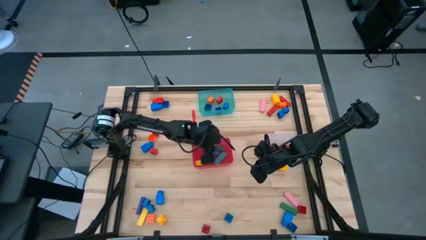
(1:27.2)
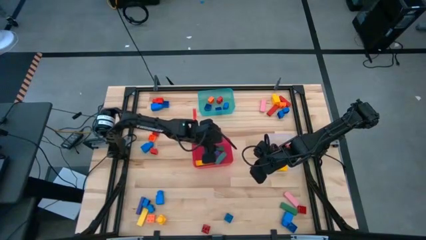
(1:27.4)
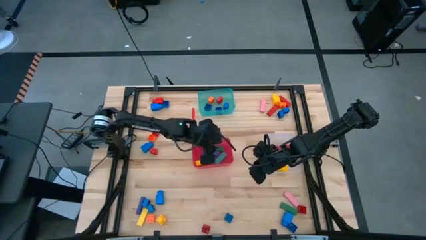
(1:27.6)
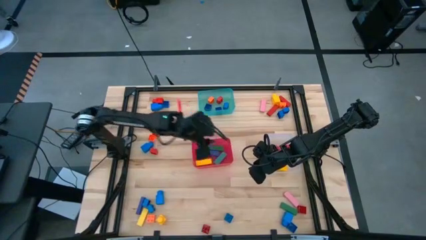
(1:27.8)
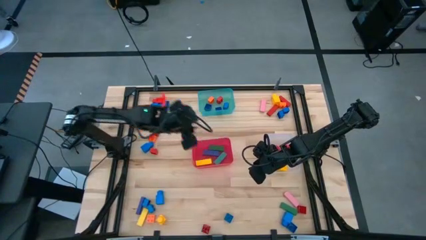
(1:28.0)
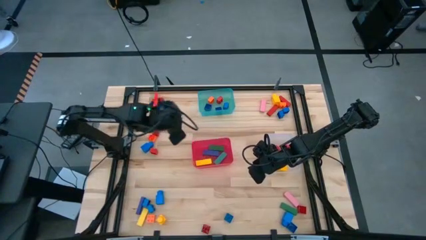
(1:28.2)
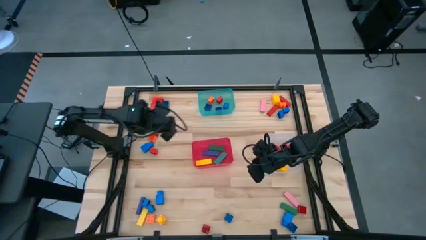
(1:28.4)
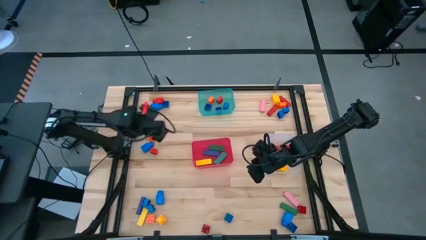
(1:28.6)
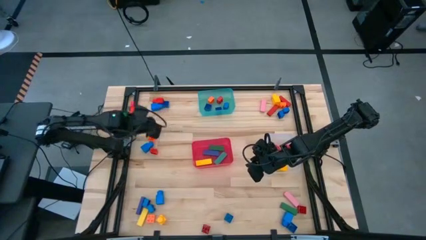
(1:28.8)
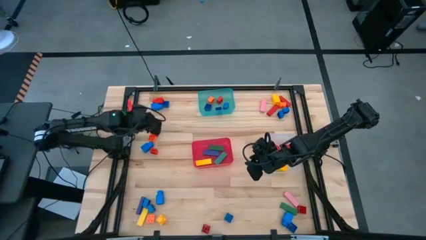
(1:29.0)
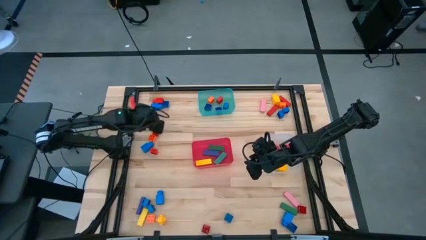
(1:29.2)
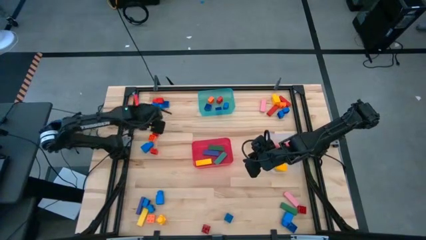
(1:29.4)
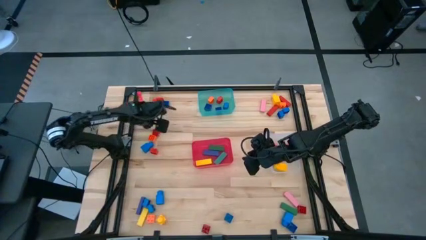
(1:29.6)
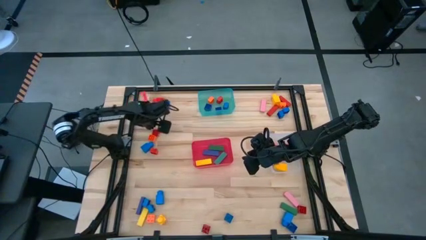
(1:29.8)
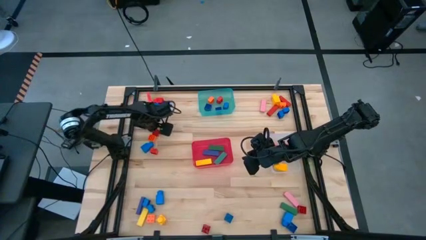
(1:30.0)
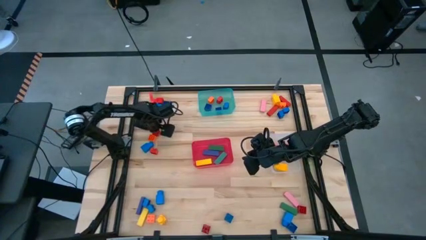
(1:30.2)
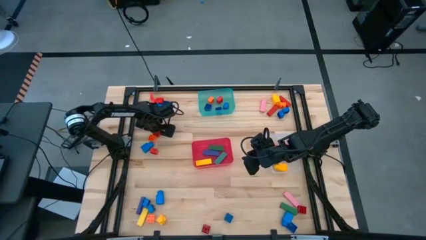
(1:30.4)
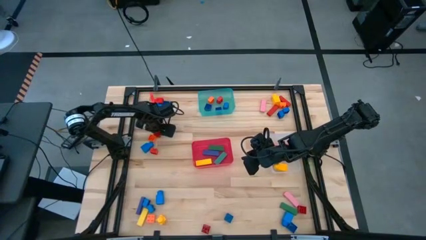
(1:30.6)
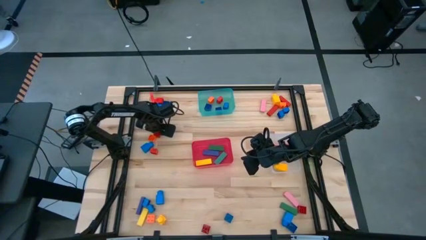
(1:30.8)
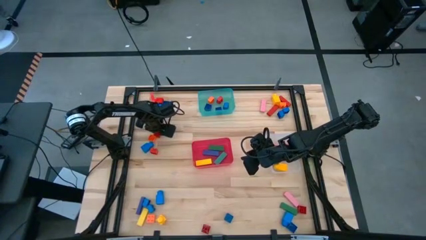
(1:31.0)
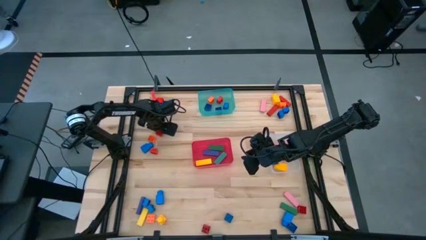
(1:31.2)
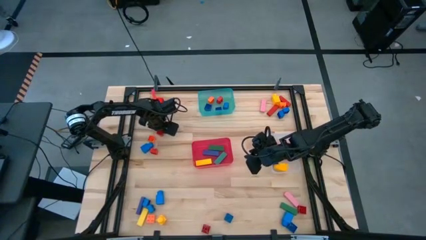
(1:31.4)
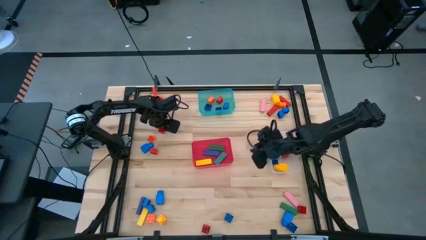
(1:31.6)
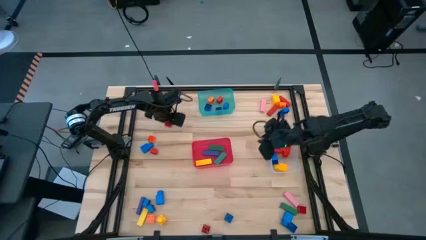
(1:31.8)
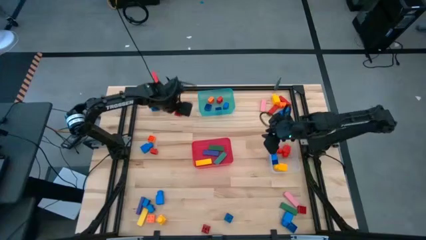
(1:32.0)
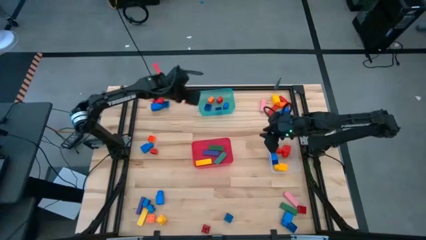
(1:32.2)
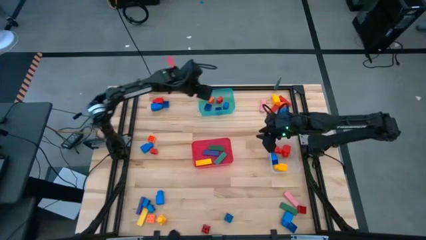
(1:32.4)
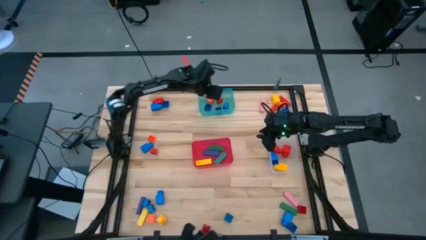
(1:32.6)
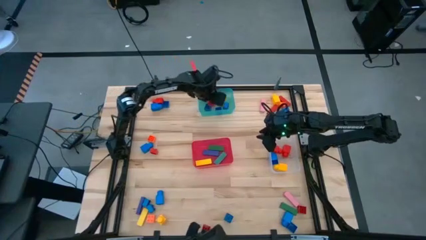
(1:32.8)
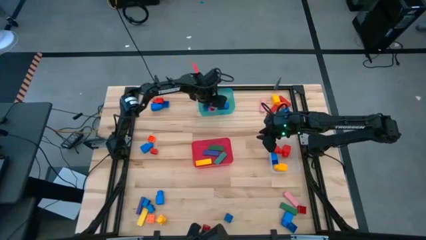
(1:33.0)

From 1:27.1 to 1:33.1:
Task: Sort blocks by size
Put the red 4 stud game piece into the blue bin

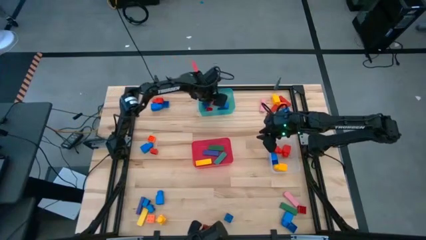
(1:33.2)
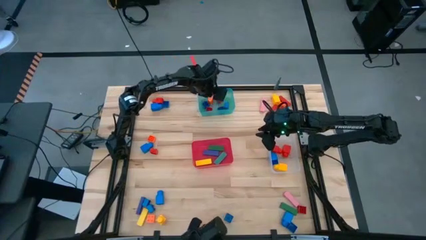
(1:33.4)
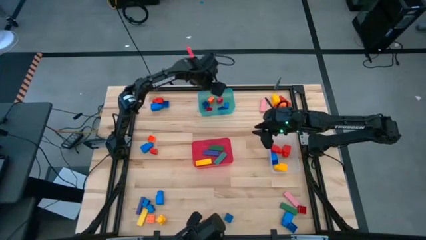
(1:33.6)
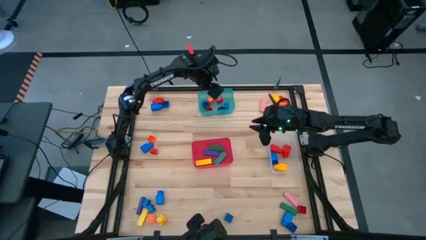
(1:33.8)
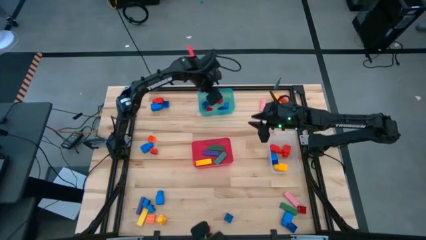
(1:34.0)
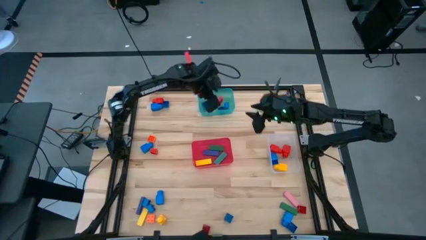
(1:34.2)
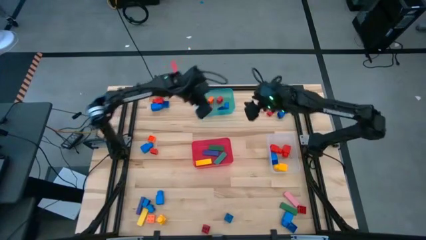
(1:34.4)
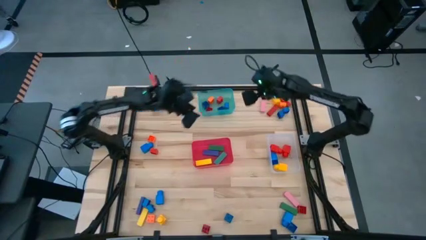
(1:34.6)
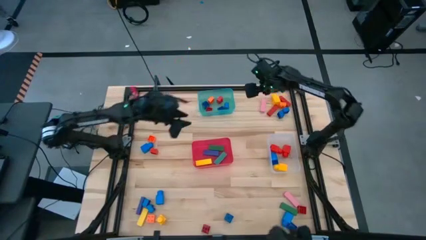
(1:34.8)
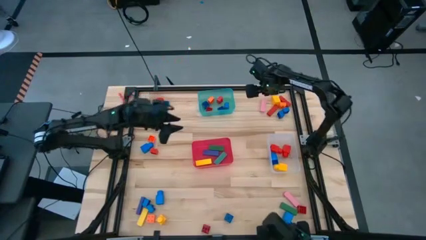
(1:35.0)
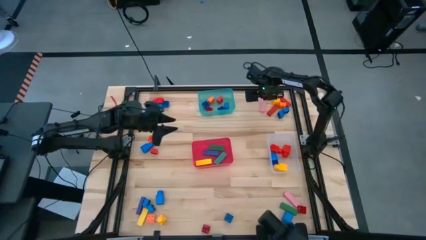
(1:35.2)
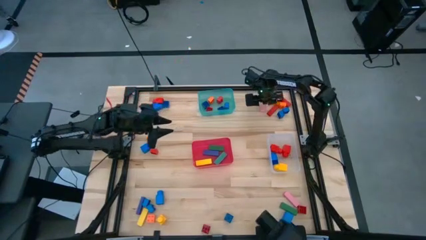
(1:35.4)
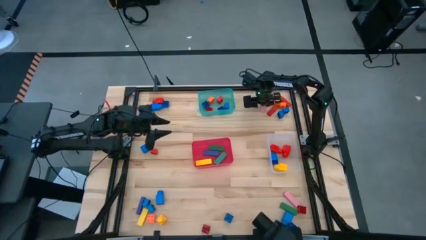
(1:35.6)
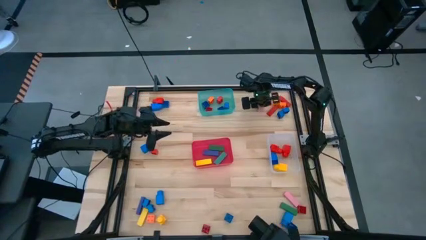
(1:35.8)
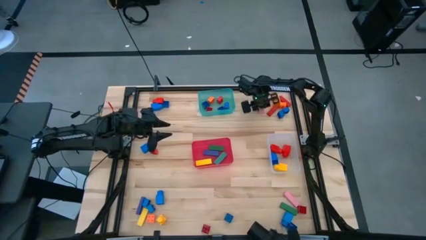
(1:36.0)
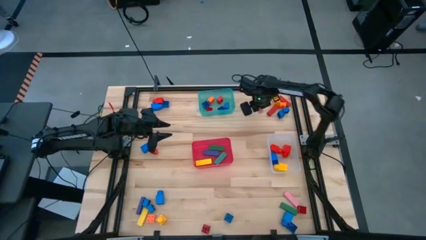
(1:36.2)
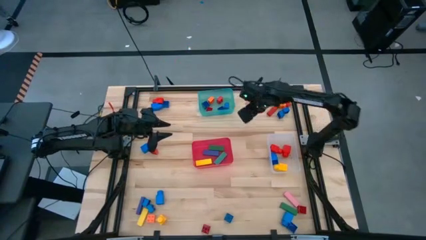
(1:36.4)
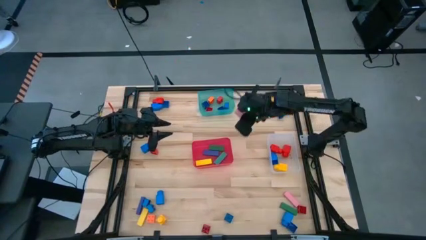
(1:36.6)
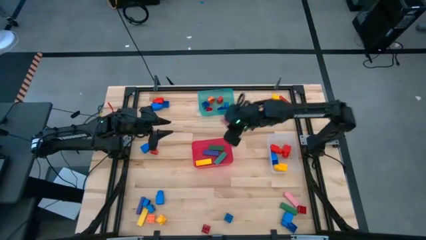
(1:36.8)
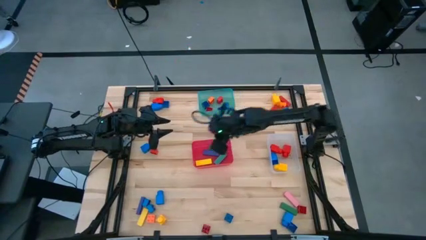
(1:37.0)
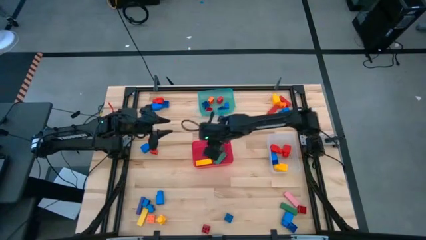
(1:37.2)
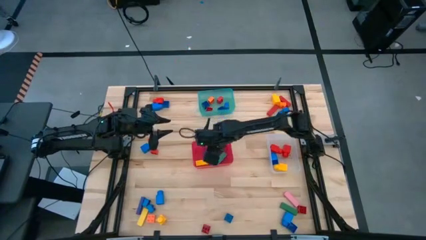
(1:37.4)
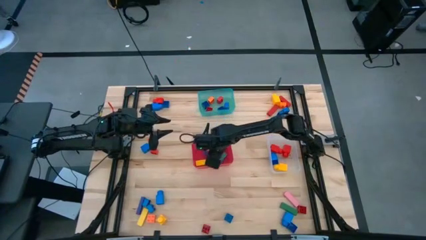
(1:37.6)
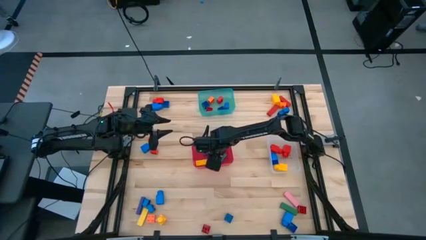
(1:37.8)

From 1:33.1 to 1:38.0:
Put the pink block into the red bin

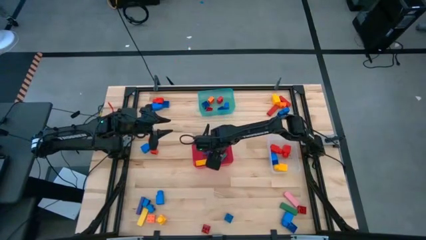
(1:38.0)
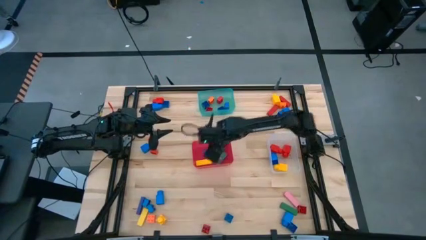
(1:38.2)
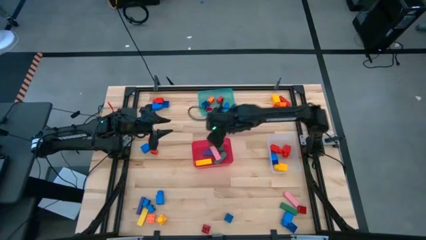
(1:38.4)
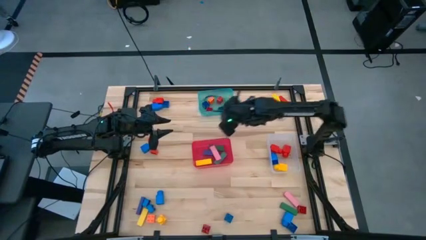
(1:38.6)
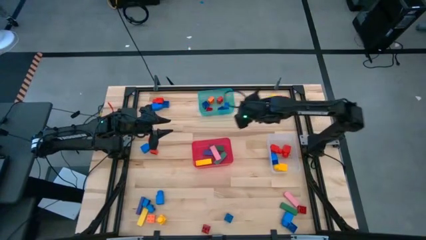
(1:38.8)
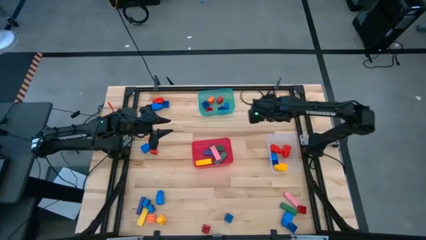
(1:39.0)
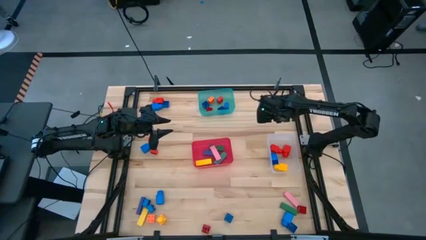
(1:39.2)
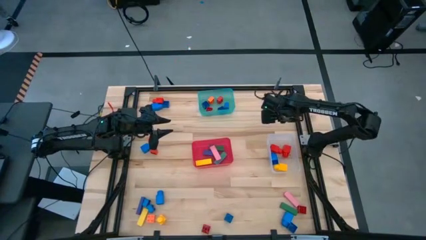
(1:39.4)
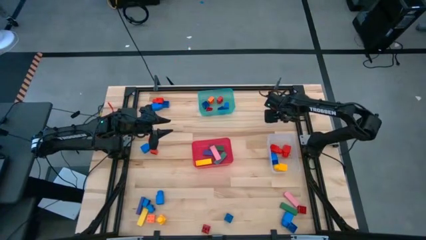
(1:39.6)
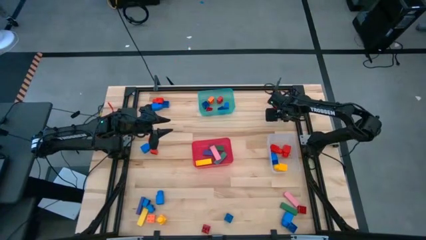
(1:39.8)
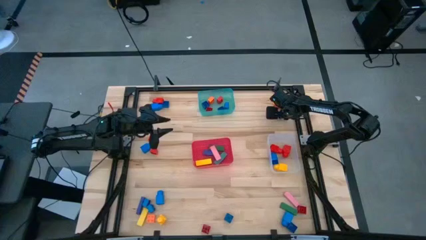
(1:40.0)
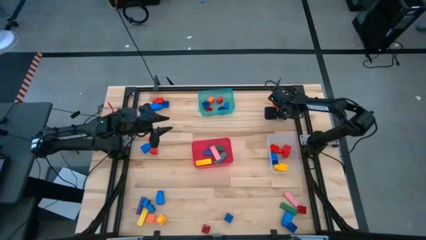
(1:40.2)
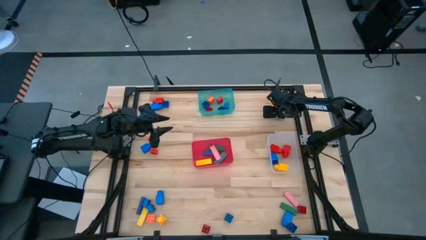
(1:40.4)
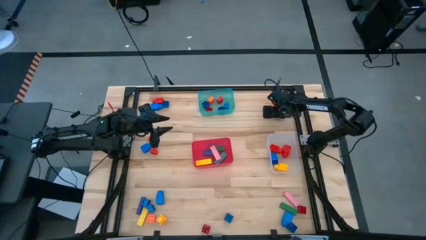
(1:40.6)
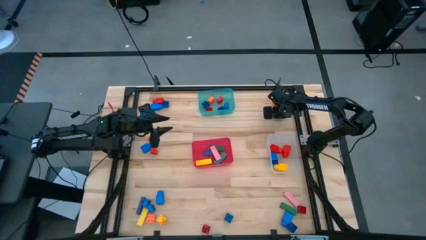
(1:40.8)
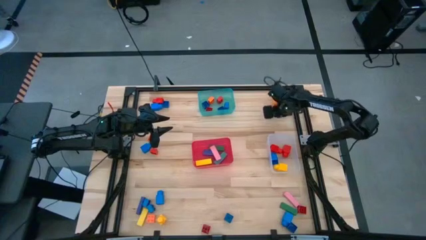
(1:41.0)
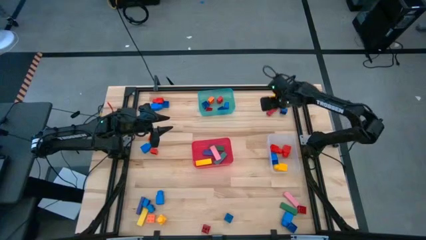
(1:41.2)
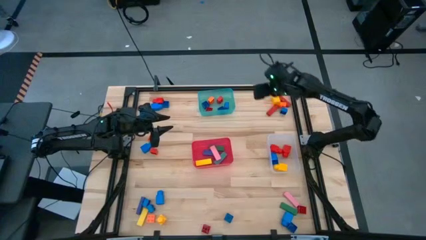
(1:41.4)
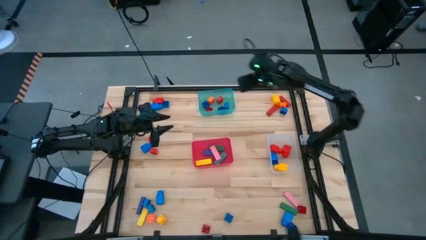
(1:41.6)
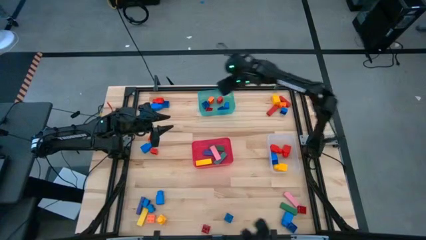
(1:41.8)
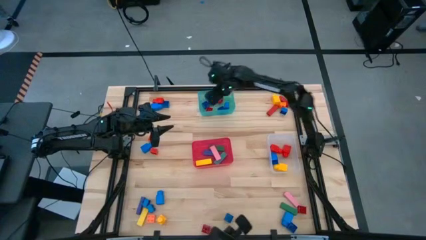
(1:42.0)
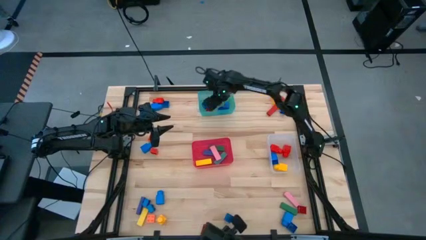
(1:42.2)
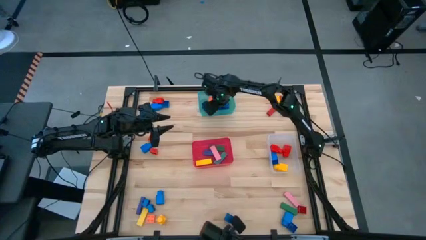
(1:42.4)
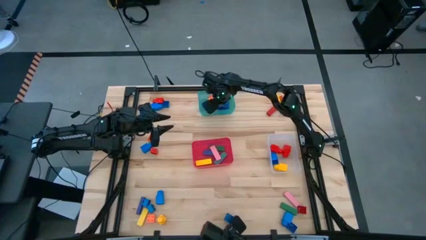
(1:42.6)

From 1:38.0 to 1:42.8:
Put the blue 4 stud game piece into the red bin
